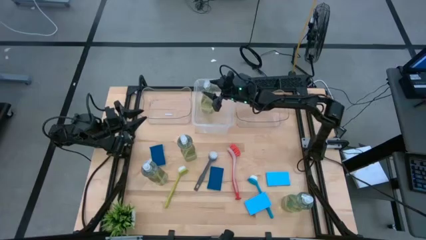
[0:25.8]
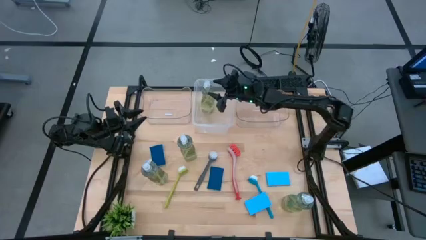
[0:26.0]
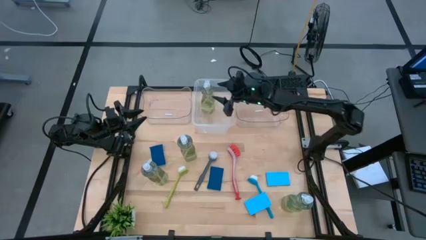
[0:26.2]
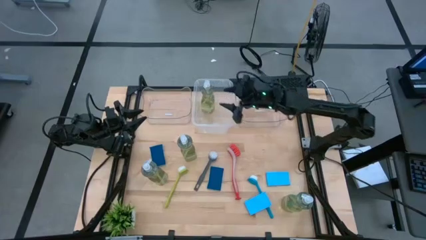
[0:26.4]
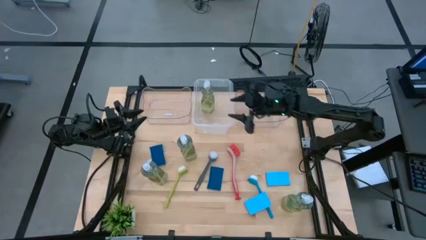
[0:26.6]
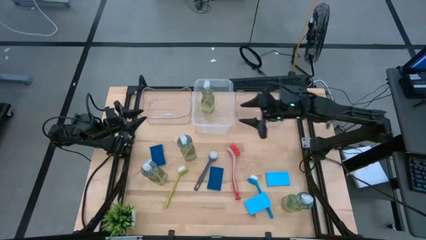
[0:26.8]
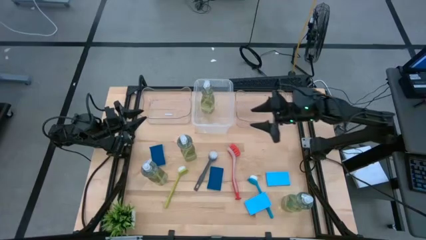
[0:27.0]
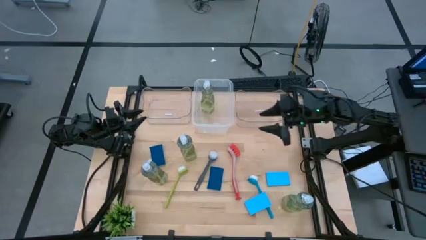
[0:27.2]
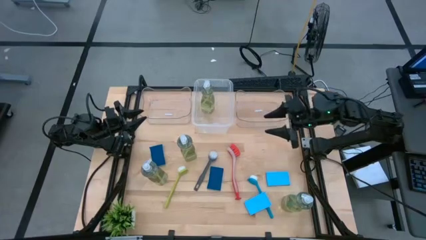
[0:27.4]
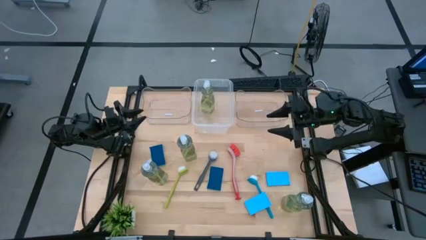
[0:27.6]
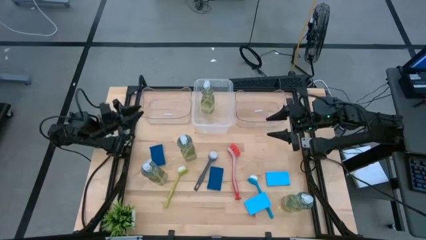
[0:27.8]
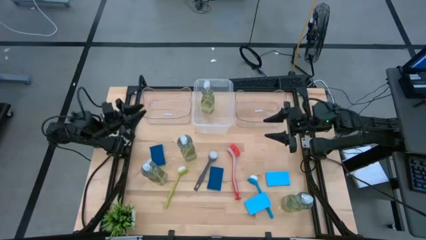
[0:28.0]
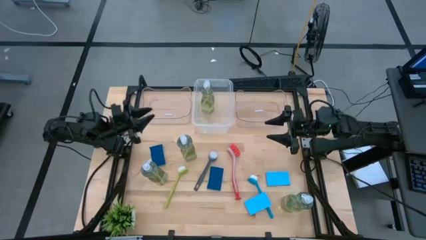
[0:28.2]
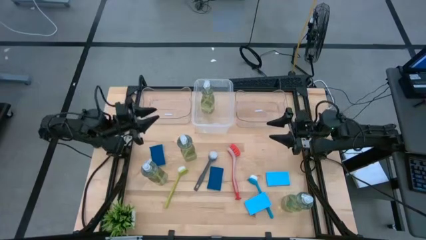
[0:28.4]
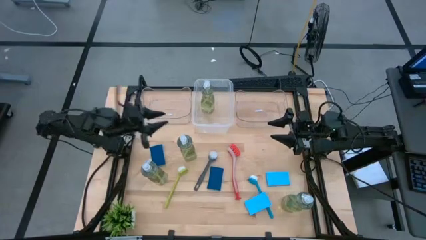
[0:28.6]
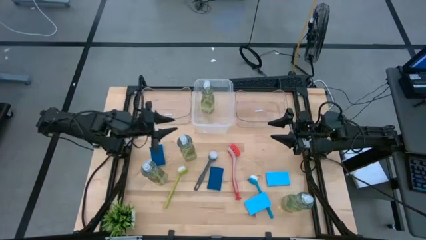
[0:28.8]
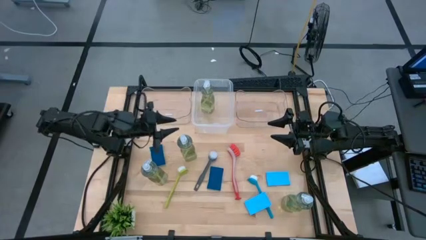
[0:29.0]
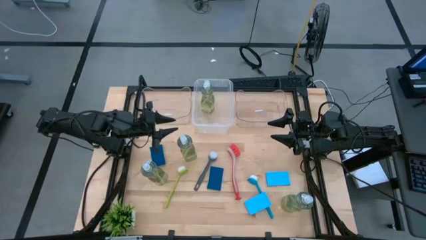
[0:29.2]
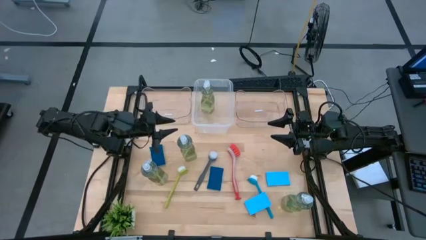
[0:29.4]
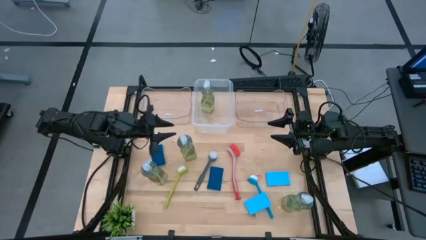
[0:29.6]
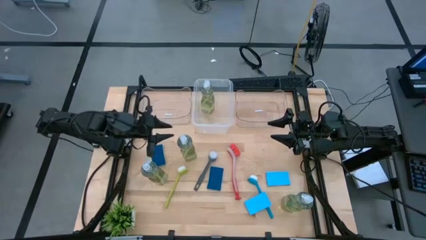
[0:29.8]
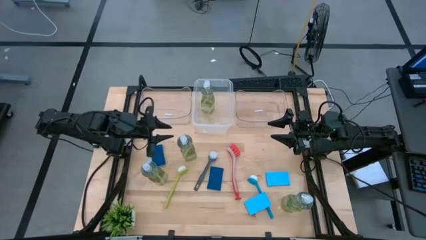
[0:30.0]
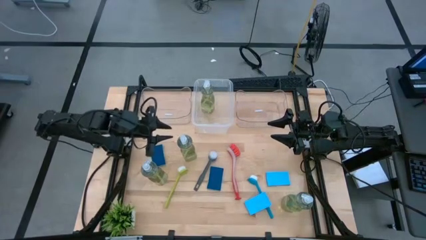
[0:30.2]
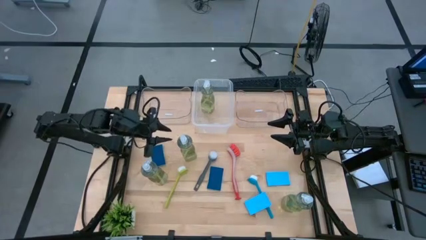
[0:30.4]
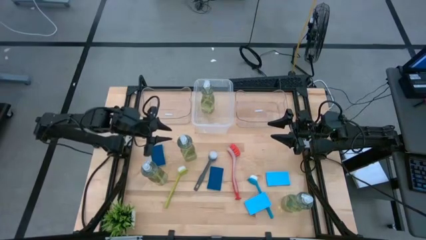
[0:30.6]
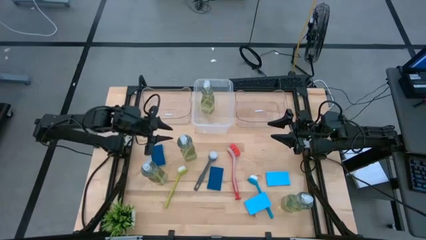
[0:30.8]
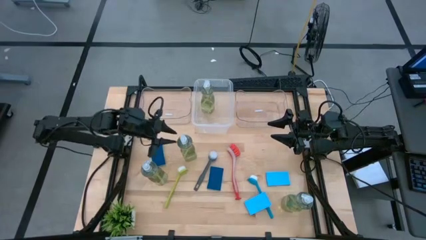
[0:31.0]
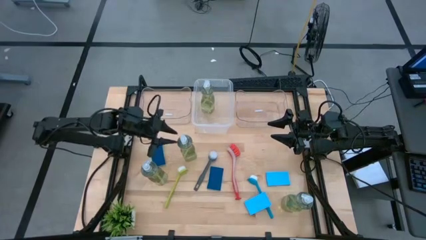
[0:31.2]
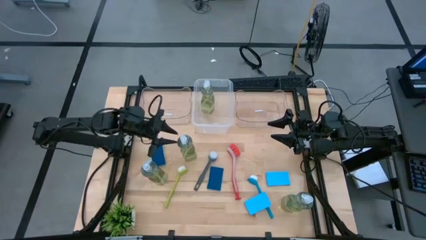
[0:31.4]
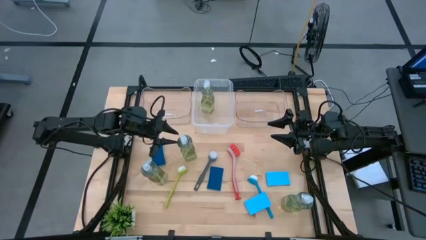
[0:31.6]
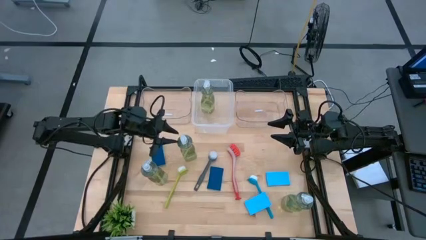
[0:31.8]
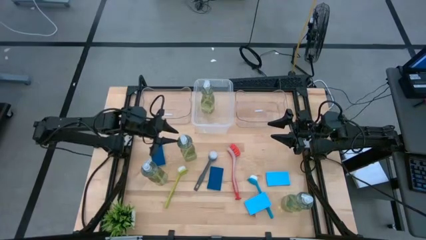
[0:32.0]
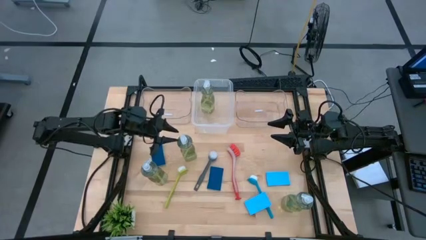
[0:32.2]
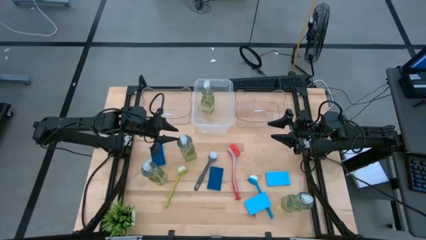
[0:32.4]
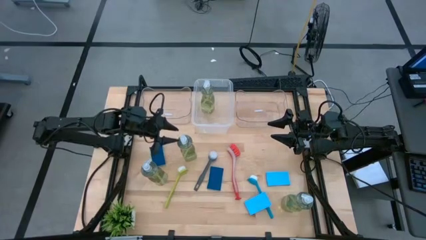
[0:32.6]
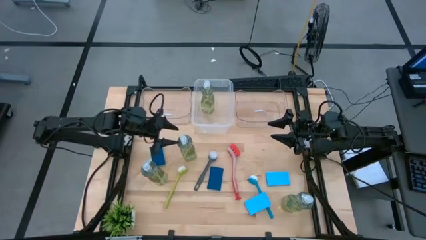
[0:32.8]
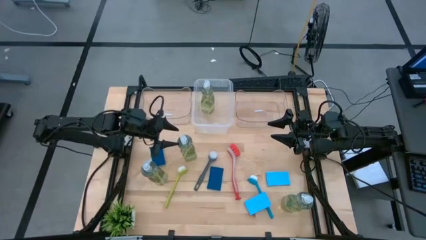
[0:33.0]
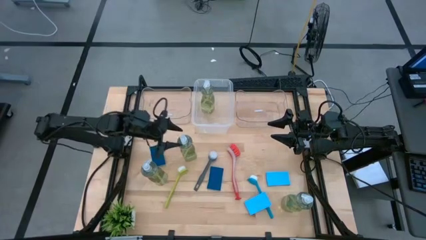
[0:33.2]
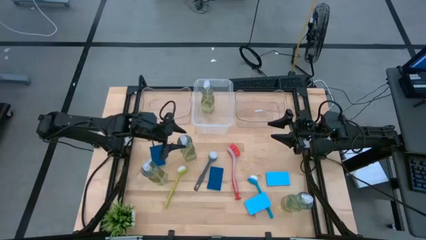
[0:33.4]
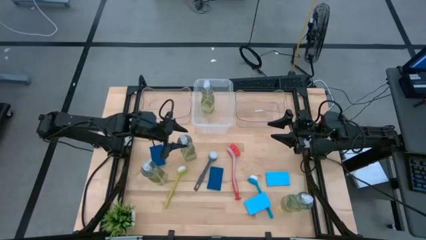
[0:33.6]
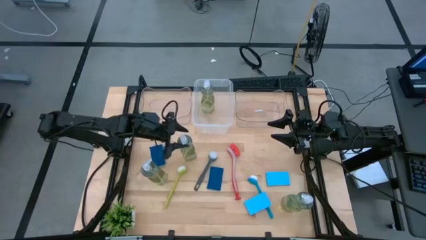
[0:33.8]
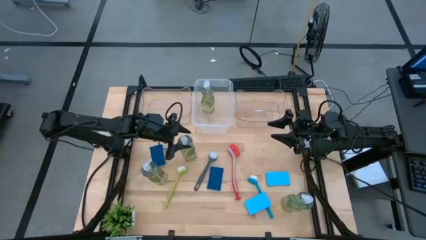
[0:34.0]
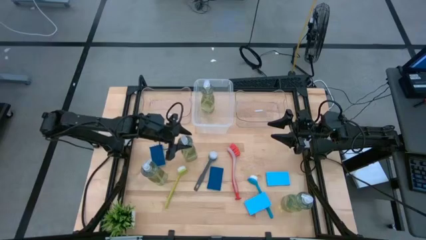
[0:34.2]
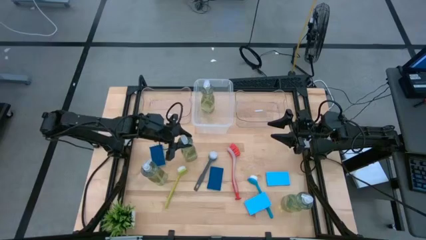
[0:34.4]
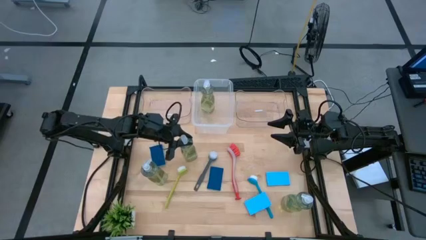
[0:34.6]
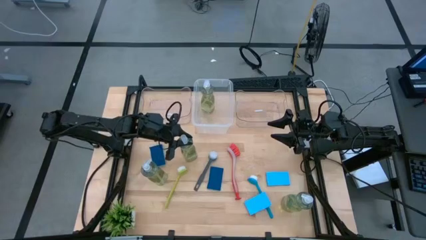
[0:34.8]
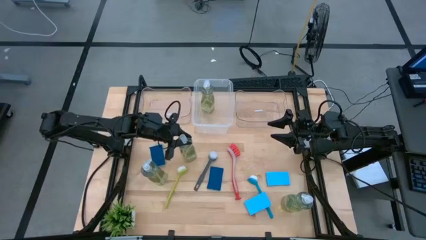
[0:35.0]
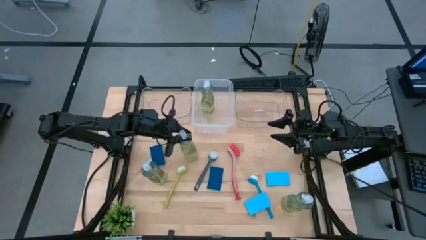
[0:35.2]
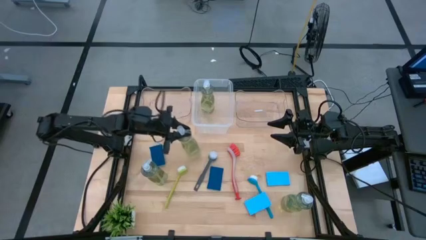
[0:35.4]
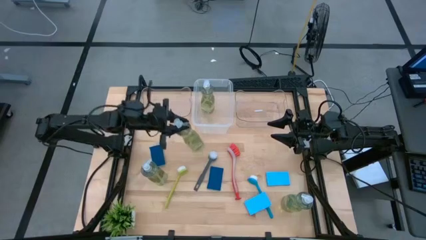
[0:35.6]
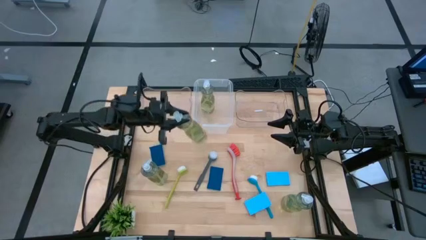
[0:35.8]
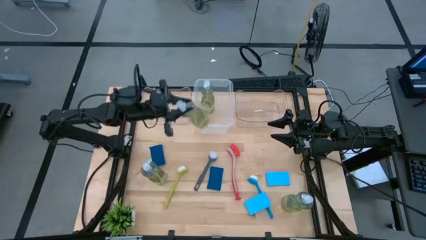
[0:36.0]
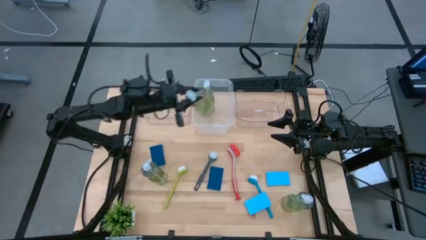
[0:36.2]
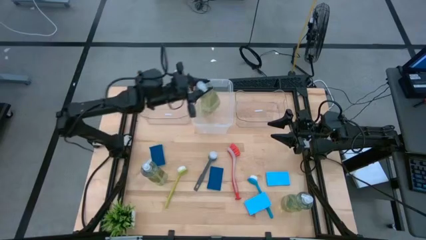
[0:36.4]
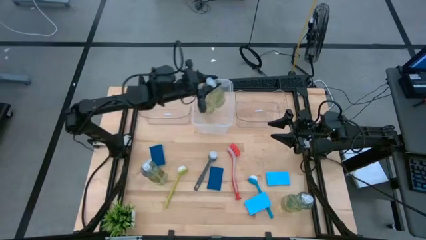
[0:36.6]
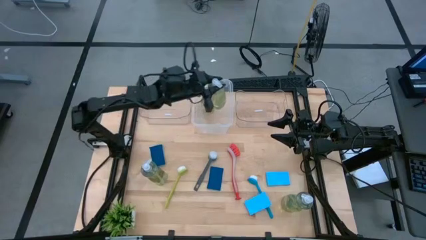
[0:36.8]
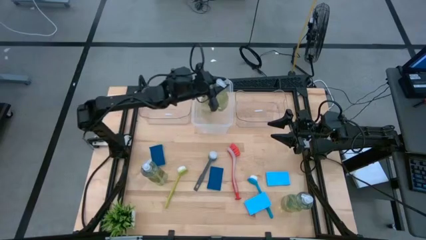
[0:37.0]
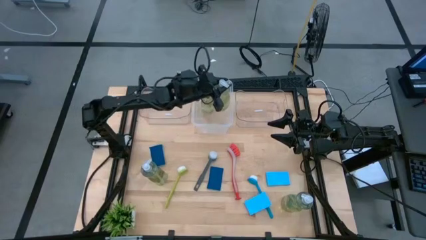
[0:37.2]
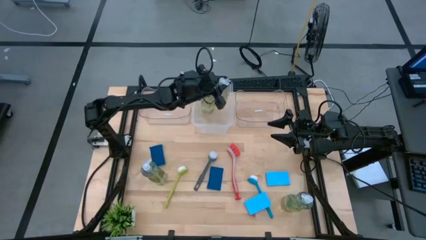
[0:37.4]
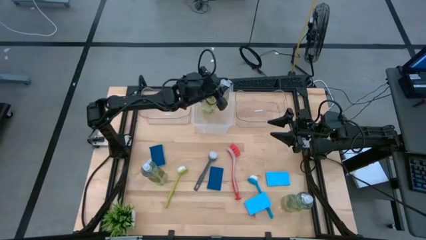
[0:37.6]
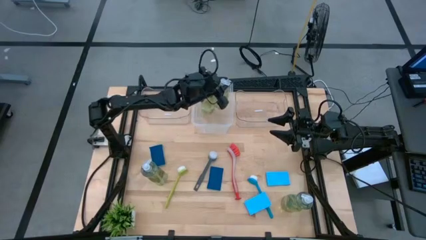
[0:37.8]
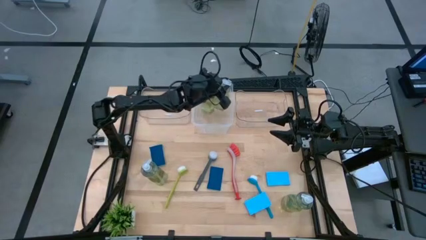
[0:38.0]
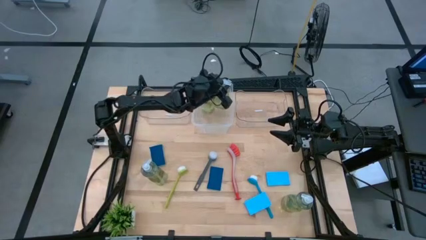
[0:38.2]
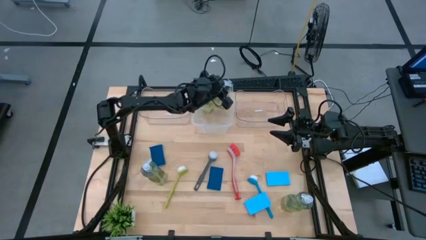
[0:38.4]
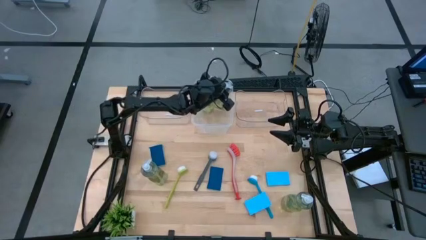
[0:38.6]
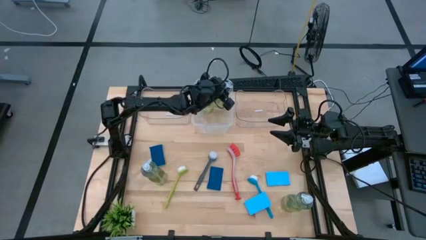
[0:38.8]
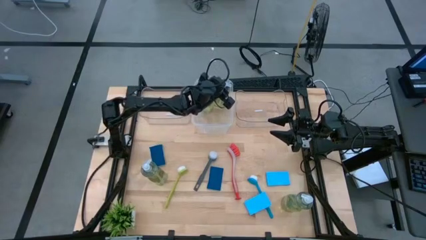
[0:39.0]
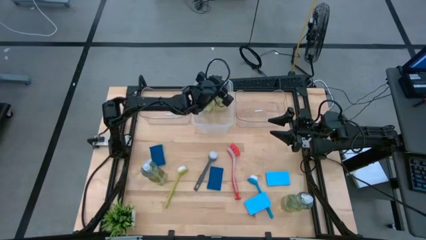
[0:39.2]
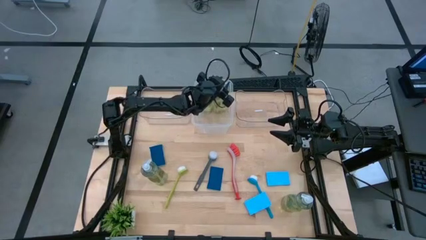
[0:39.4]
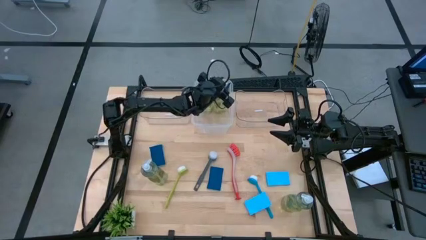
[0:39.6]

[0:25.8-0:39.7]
Task: Pick & Place Kitchen Sink Supplies
Put the green soap dispenser into the white transparent bin

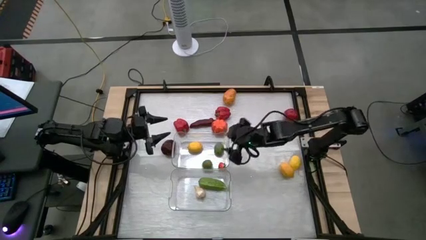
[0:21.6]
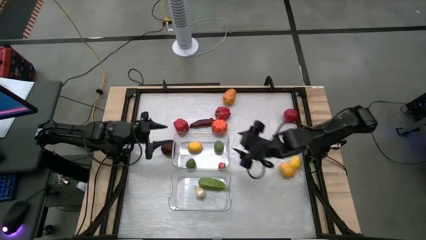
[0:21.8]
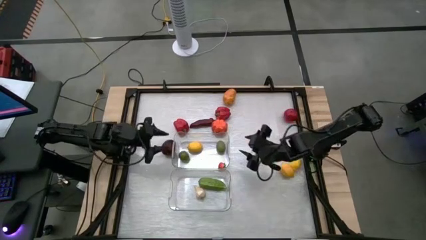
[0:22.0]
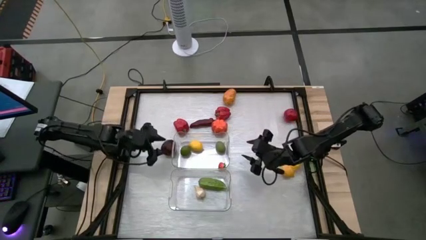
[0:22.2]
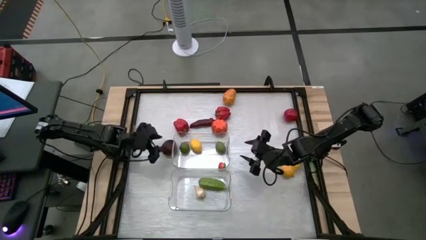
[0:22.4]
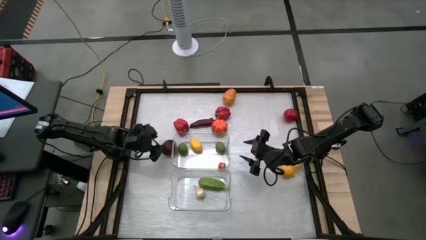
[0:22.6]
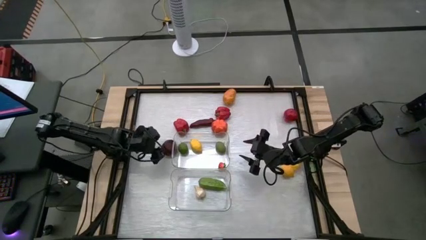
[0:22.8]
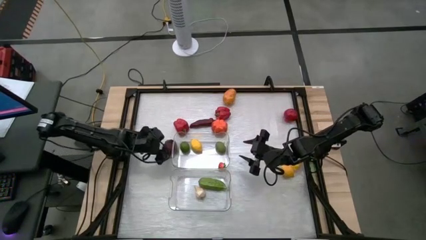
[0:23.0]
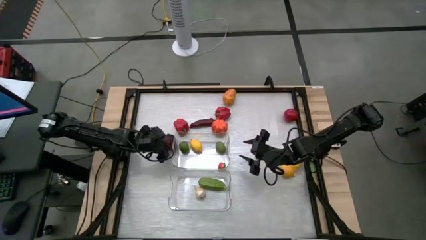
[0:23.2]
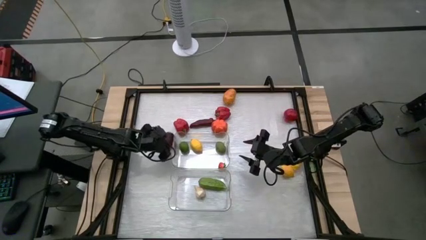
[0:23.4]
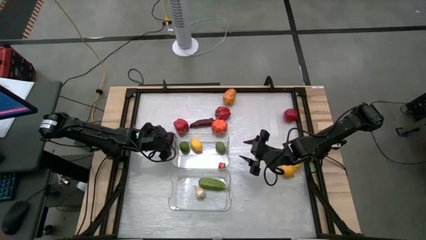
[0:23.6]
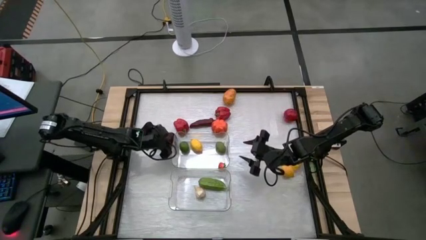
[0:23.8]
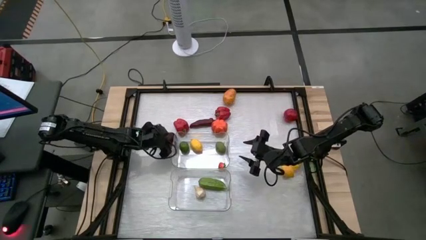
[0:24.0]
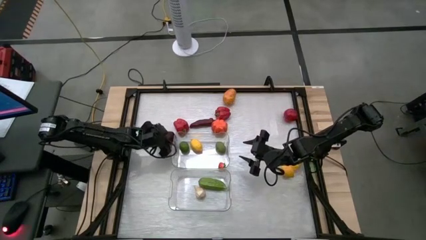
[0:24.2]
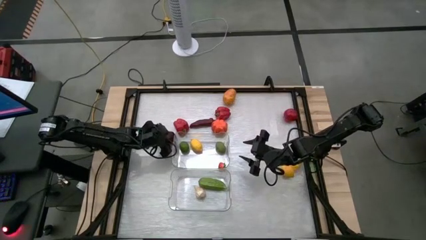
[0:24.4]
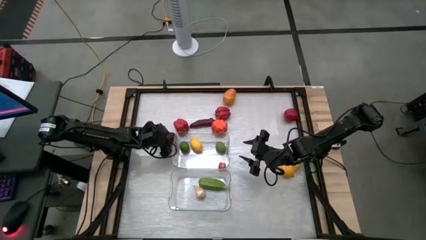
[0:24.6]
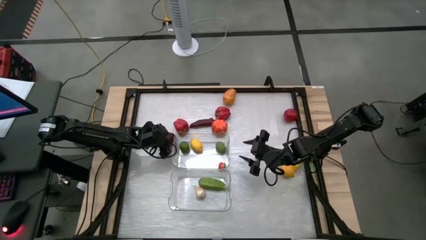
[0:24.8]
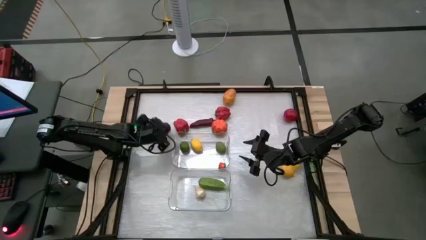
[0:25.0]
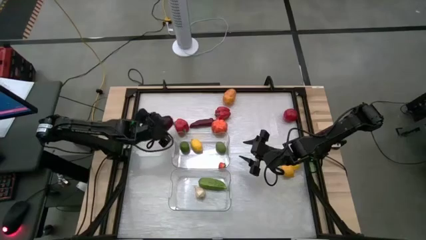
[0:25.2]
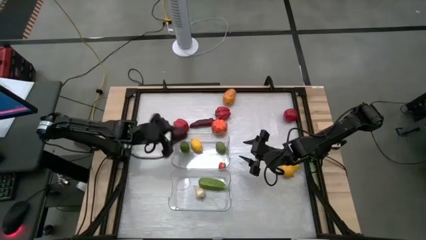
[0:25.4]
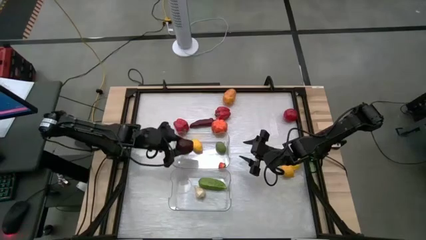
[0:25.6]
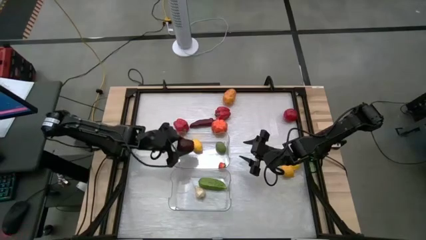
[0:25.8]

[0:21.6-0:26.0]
Task: Sort produce into baskets
Put the apple into the top transparent bin
